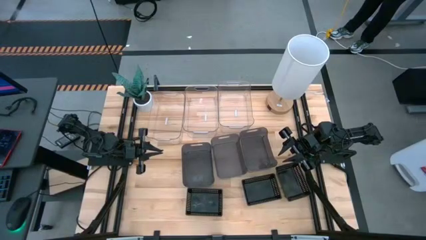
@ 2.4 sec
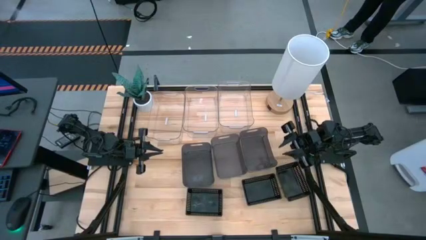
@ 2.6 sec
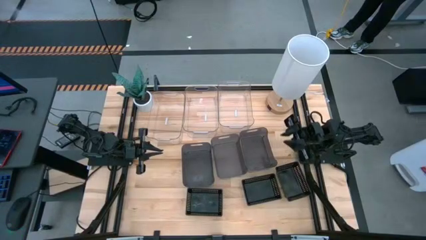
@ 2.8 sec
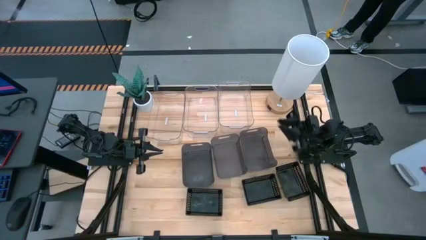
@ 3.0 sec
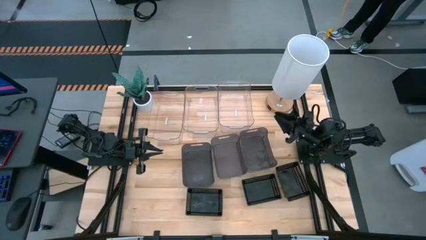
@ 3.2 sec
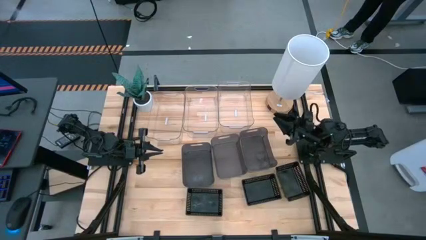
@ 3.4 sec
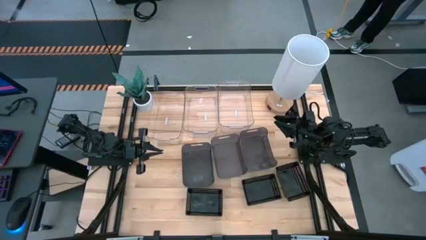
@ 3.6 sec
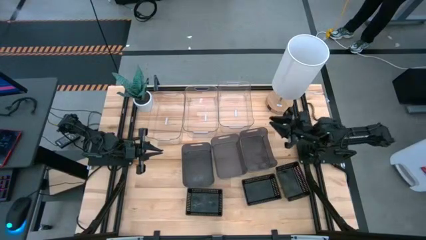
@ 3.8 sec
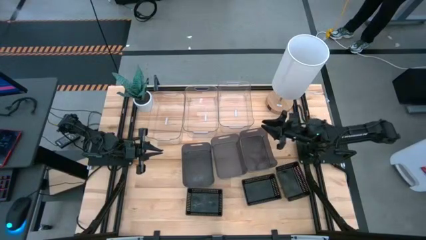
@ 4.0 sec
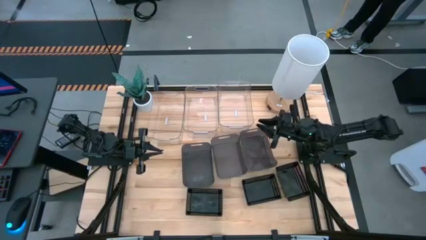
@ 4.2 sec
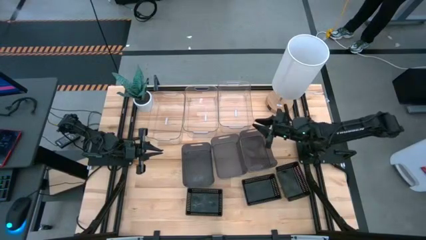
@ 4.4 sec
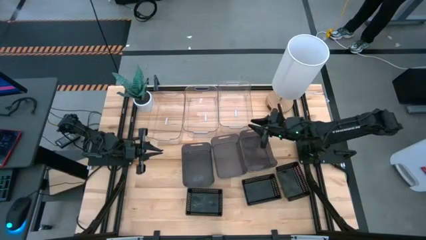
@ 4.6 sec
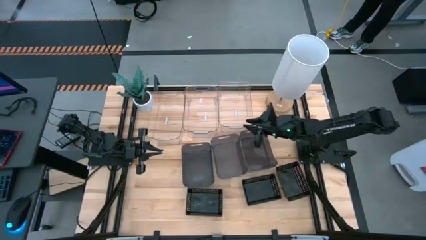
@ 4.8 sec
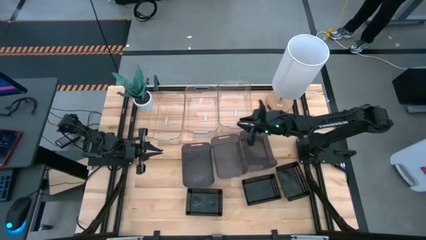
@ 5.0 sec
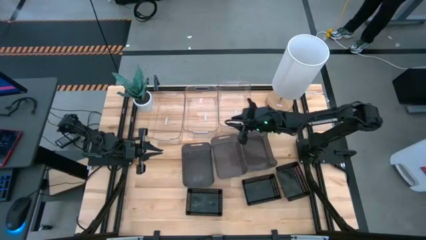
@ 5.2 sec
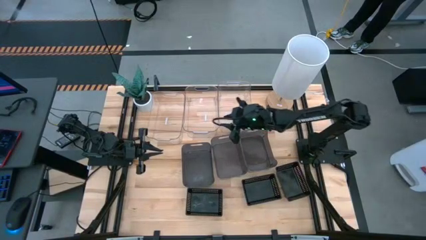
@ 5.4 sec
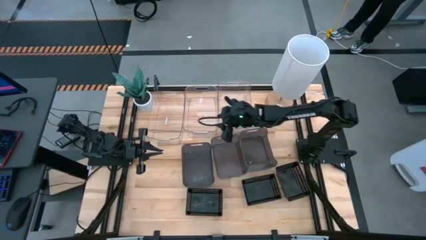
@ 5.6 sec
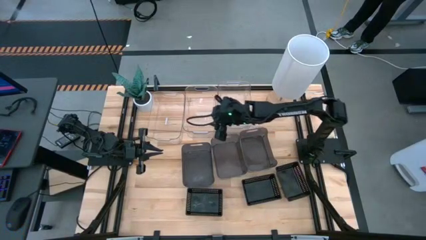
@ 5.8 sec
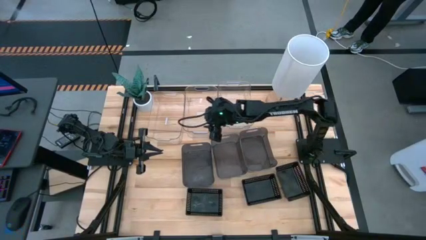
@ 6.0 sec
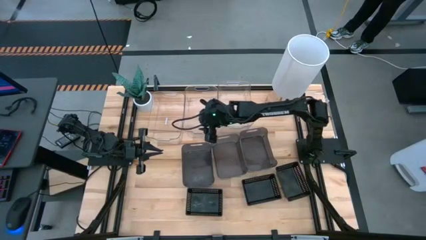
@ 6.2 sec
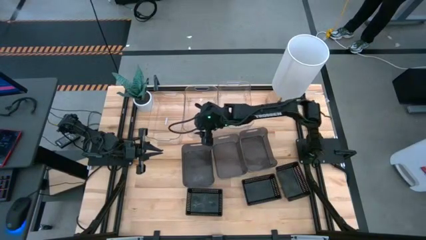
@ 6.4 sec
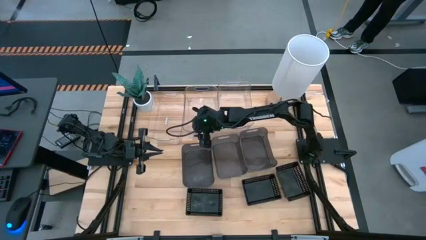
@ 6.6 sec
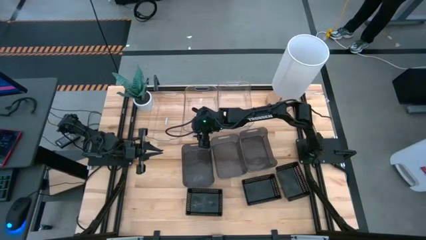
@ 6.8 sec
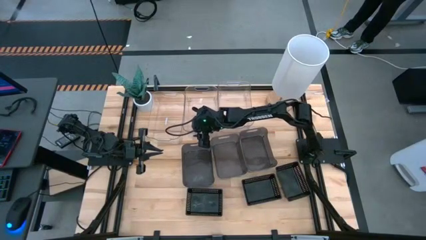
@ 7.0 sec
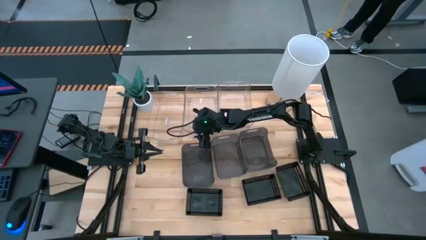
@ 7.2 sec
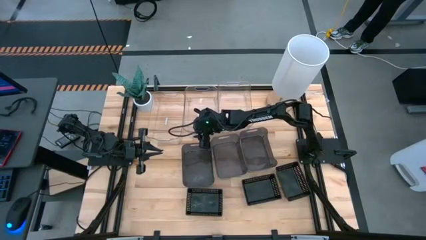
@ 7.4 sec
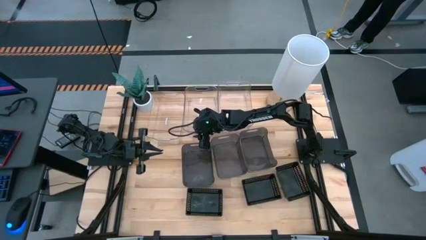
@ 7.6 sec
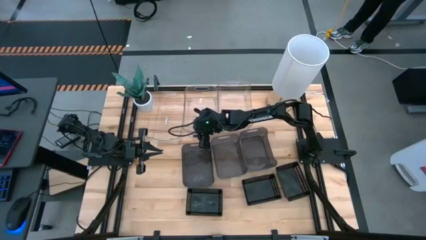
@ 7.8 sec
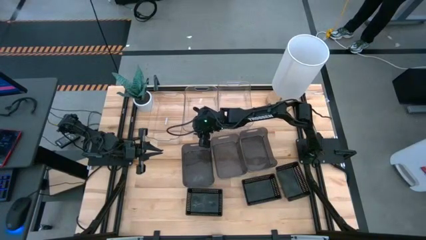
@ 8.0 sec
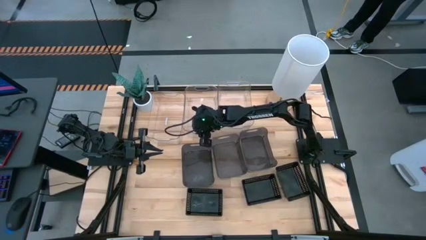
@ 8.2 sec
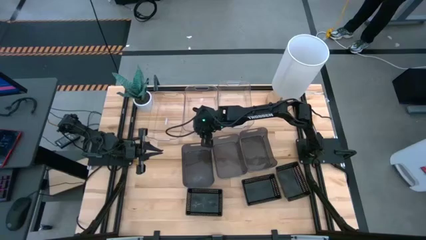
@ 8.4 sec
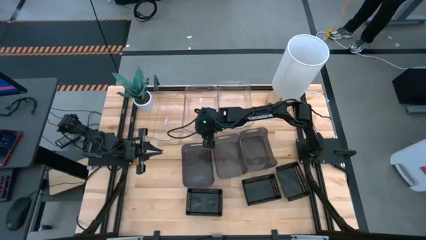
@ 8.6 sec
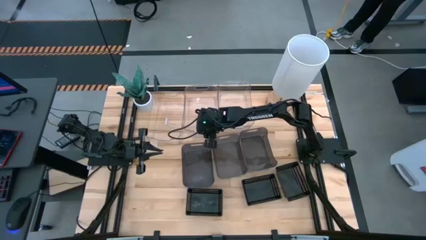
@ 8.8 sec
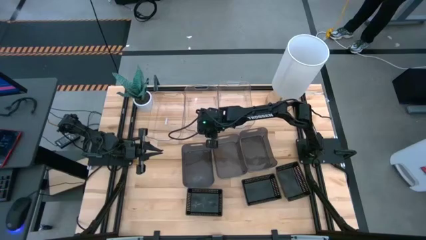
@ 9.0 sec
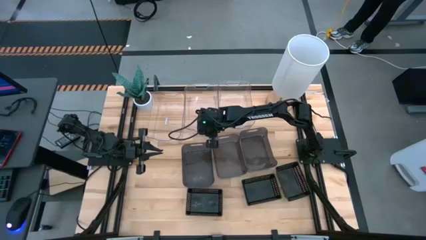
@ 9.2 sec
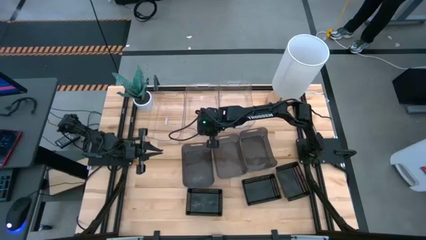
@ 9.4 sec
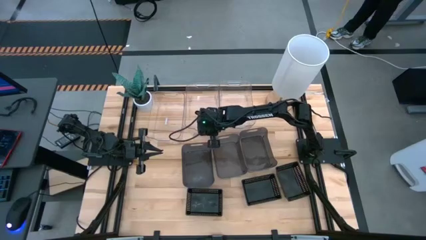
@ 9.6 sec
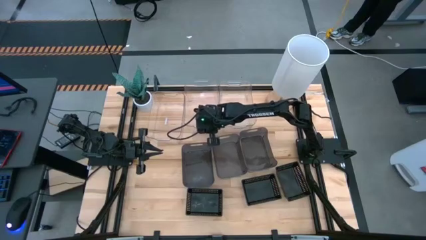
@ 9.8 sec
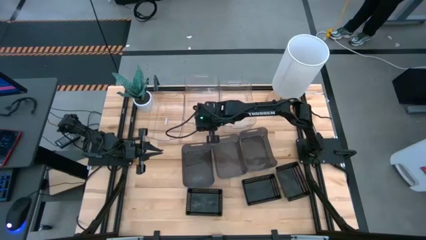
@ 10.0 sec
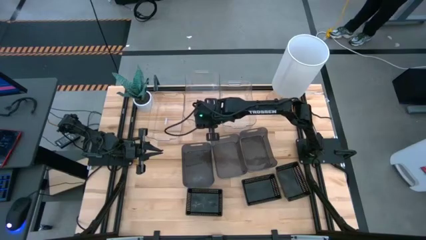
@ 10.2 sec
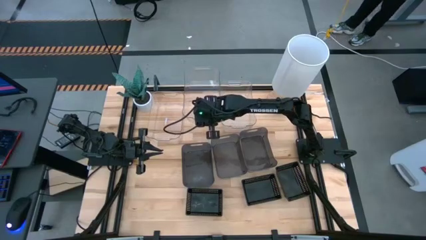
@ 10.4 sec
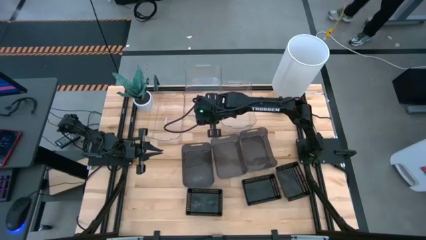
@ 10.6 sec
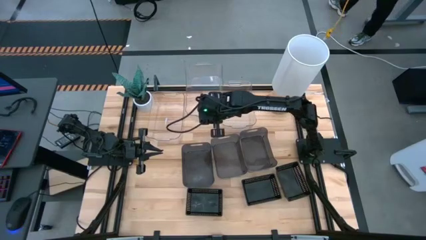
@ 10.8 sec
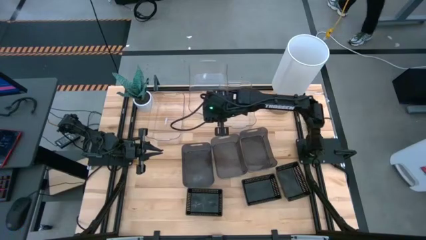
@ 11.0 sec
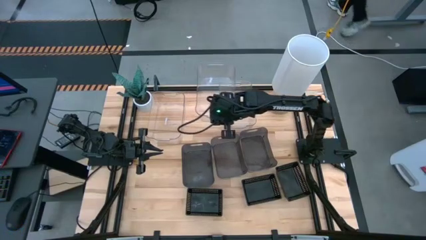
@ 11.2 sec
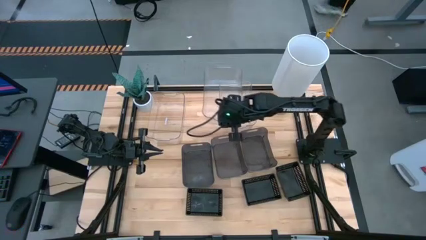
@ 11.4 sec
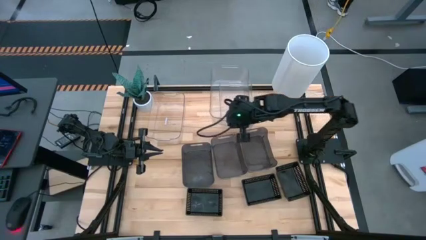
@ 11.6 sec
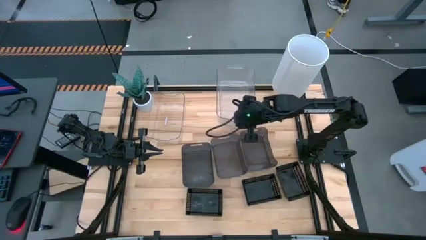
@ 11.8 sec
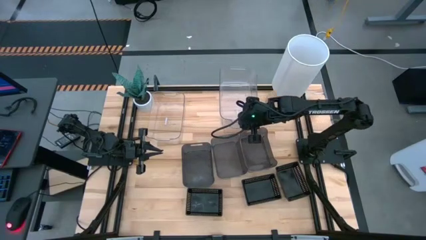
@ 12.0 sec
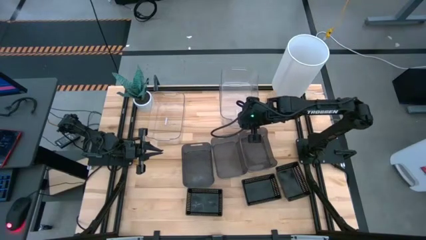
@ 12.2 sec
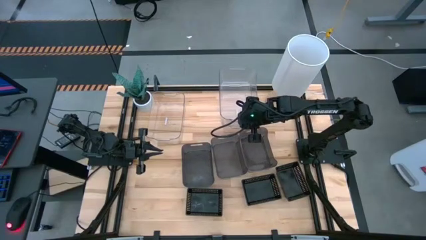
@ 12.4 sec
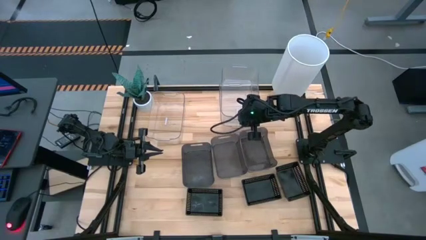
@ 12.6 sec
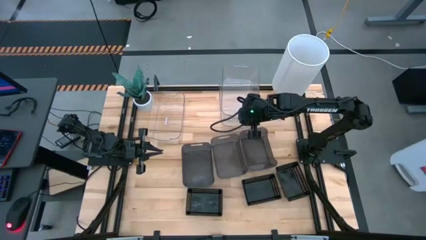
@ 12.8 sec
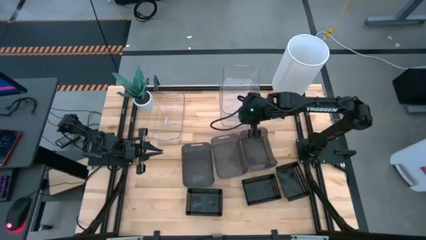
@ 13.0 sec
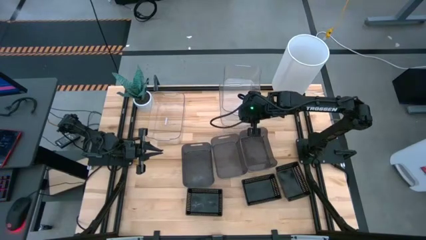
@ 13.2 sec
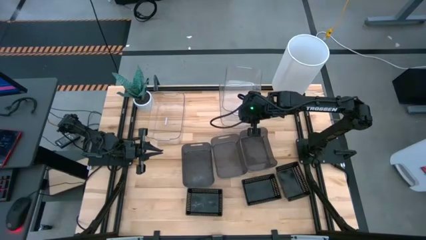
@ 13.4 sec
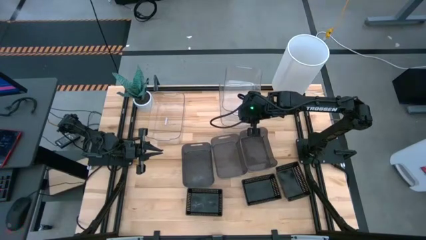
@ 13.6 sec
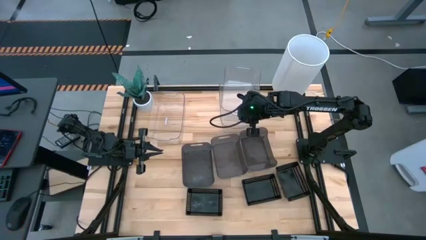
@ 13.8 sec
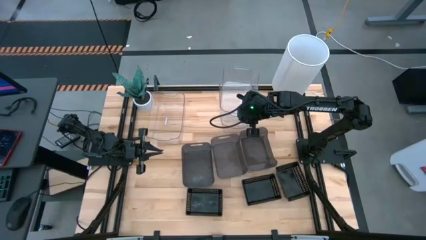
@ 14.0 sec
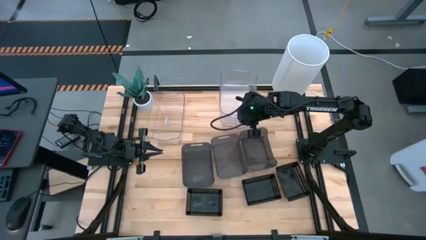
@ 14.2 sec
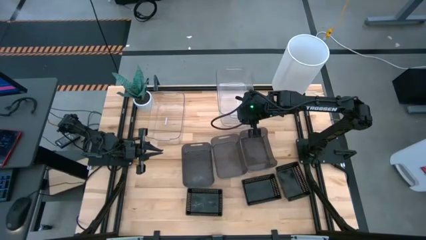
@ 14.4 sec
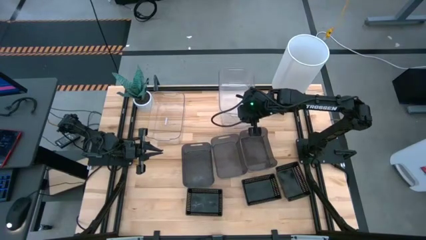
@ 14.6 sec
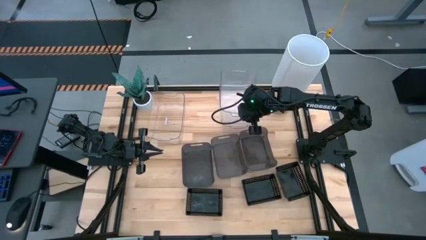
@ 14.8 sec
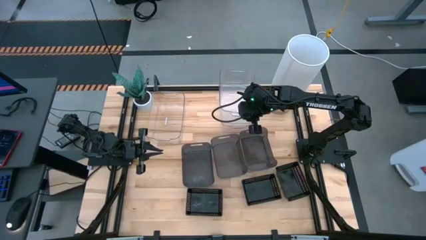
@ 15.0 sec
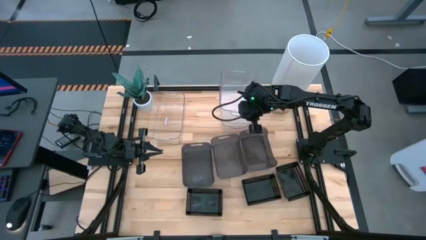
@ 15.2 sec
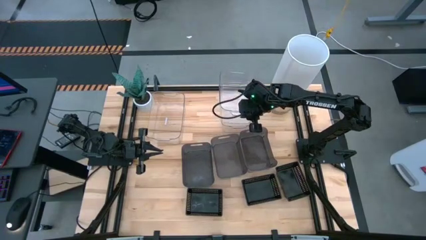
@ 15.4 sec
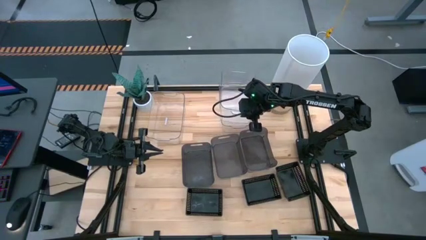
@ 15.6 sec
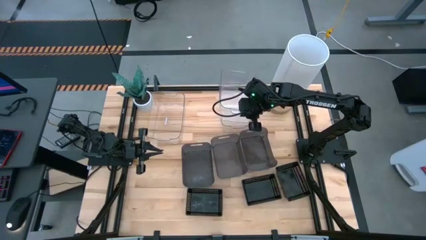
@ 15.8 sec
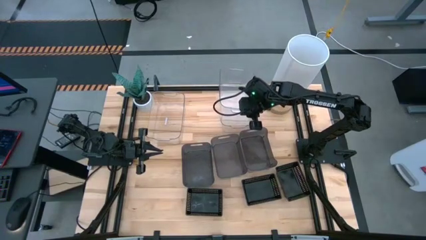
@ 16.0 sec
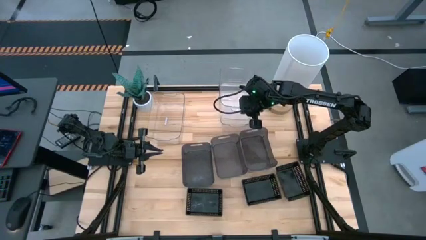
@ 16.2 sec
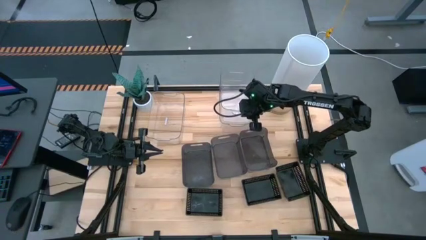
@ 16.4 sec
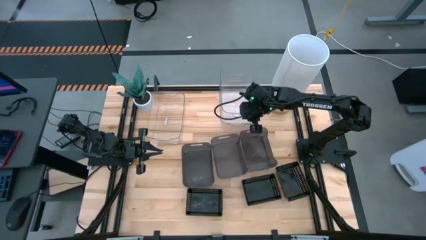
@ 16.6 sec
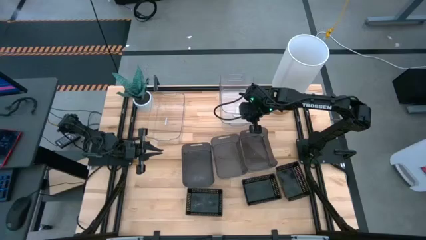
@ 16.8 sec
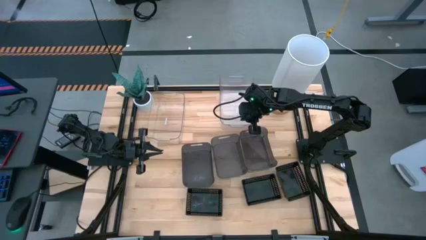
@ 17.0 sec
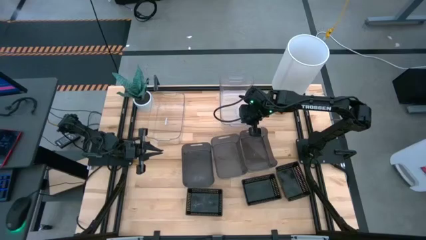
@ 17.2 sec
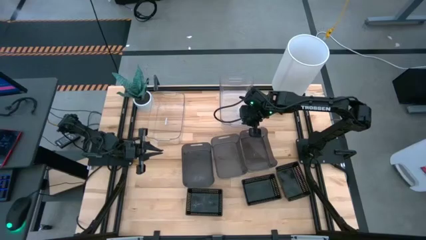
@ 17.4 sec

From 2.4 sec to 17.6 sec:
Stack the middle transparent bin on top of the right transparent bin
